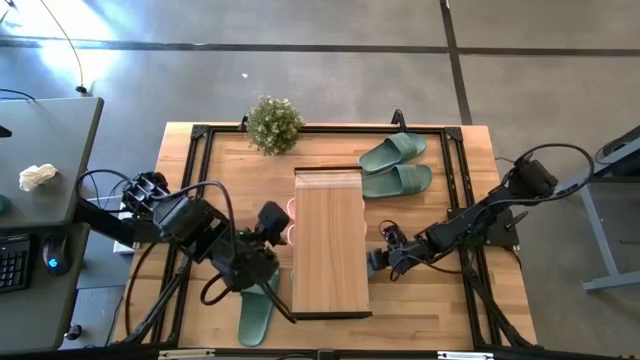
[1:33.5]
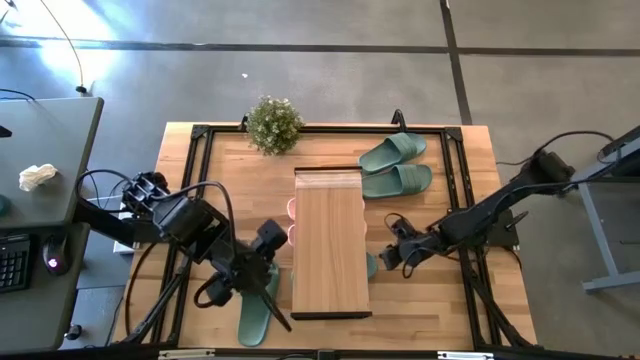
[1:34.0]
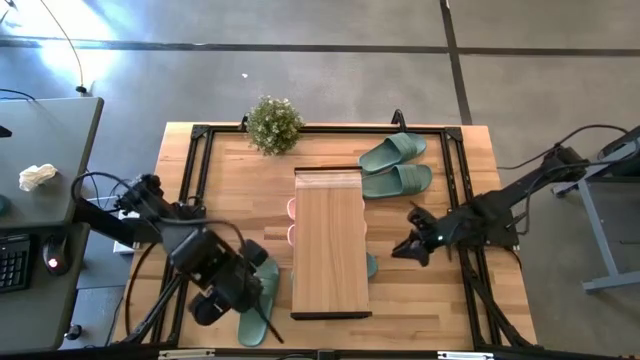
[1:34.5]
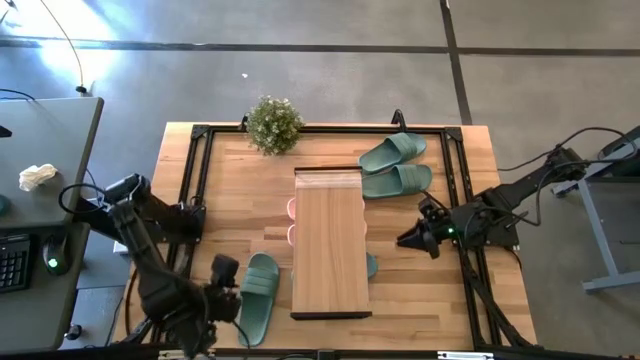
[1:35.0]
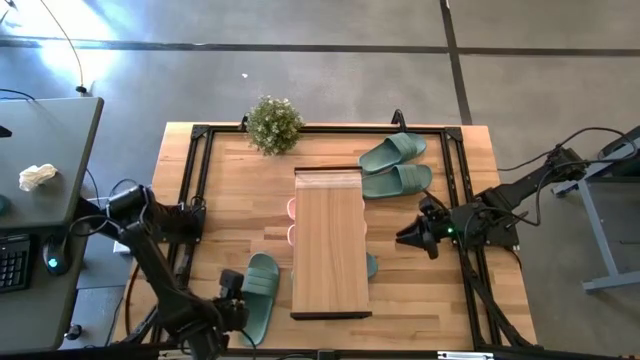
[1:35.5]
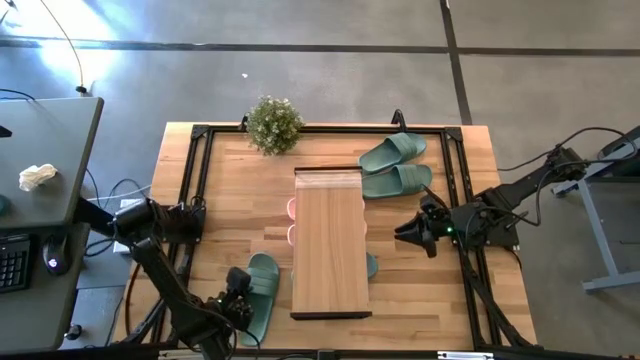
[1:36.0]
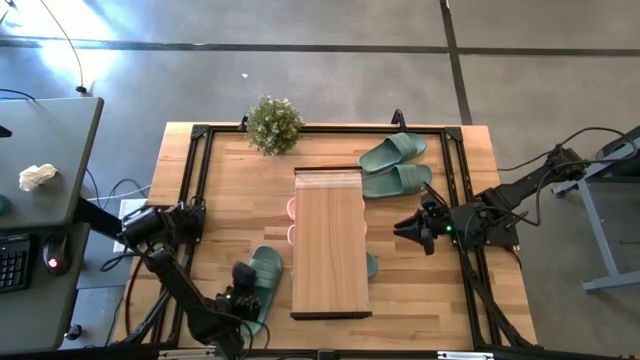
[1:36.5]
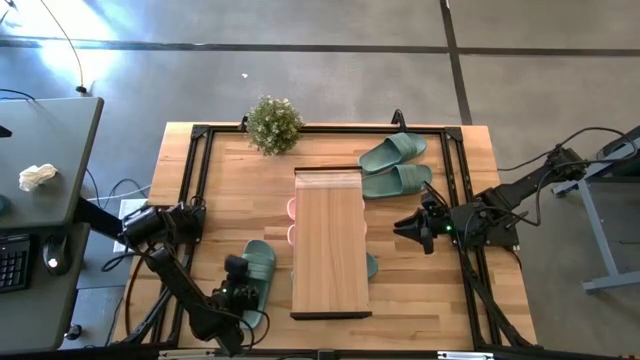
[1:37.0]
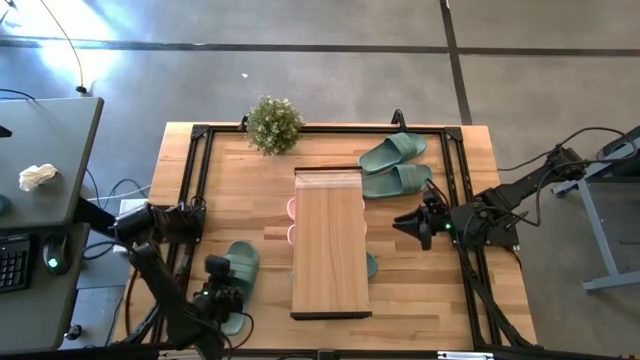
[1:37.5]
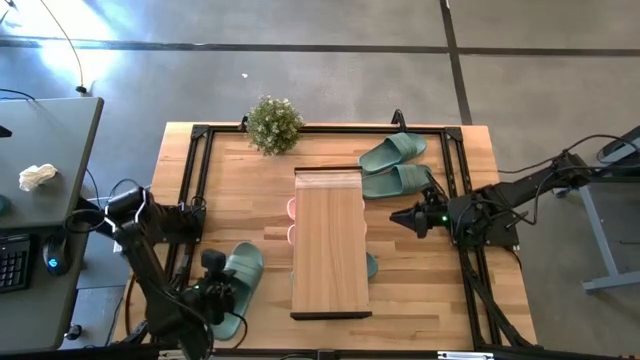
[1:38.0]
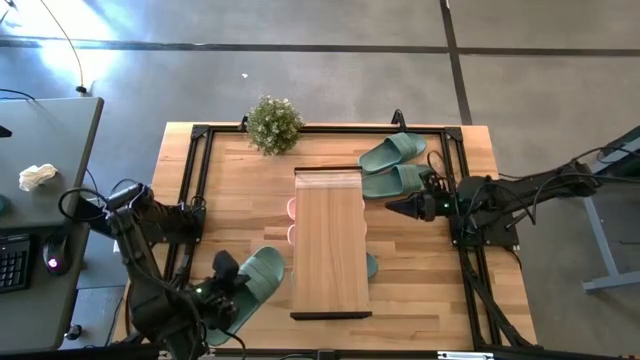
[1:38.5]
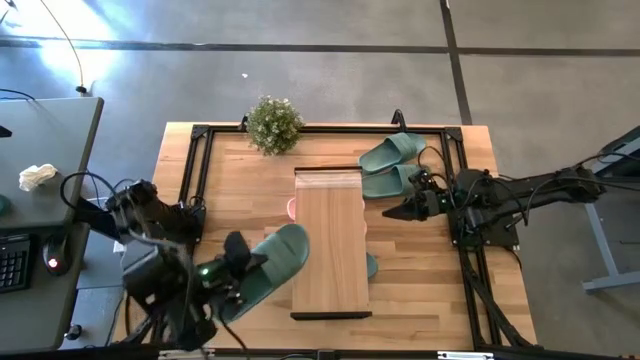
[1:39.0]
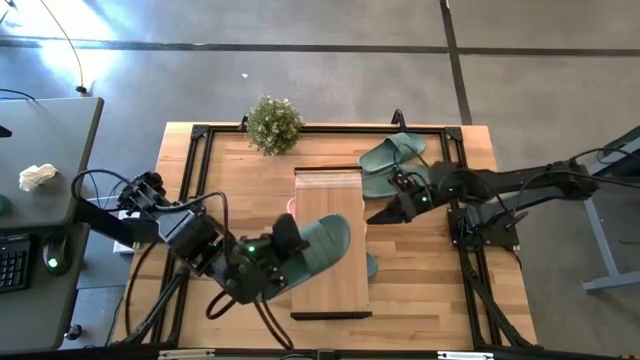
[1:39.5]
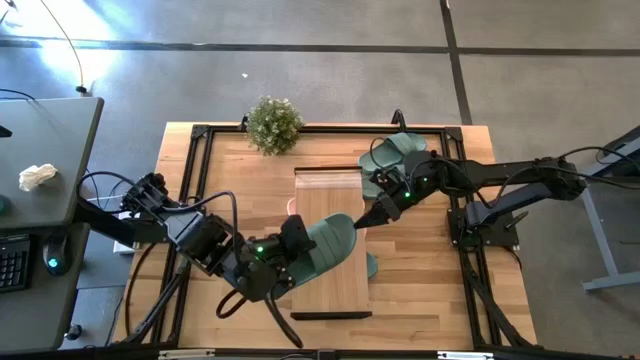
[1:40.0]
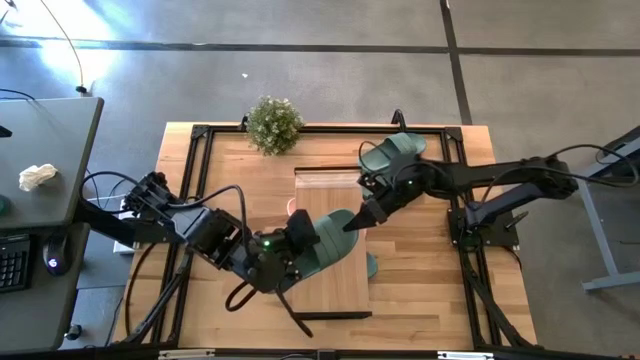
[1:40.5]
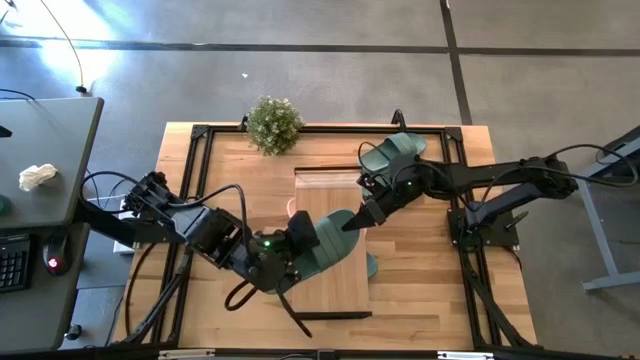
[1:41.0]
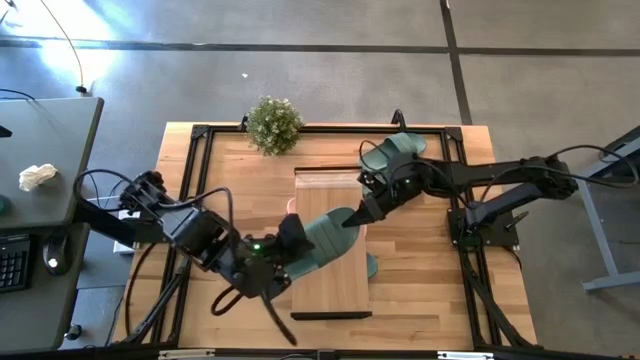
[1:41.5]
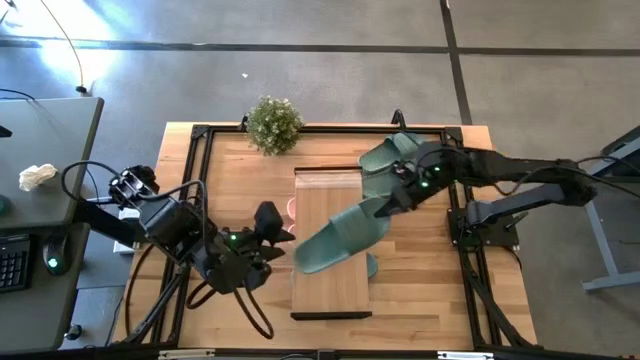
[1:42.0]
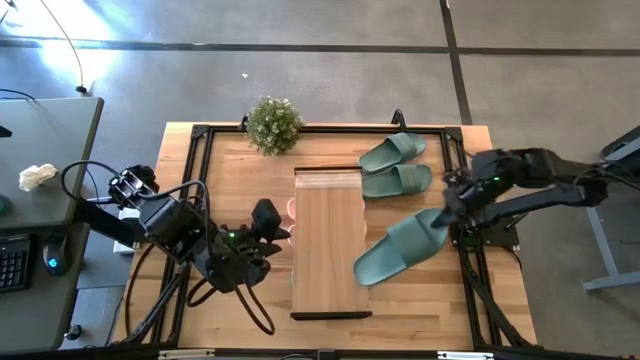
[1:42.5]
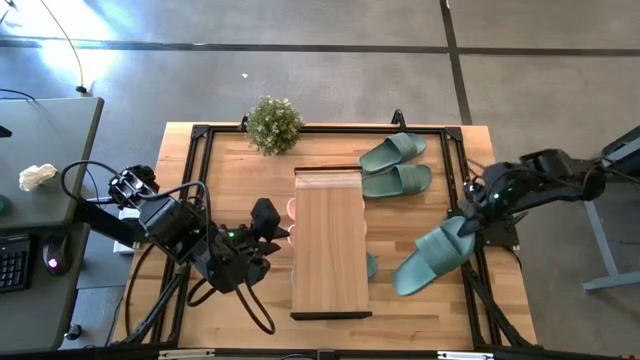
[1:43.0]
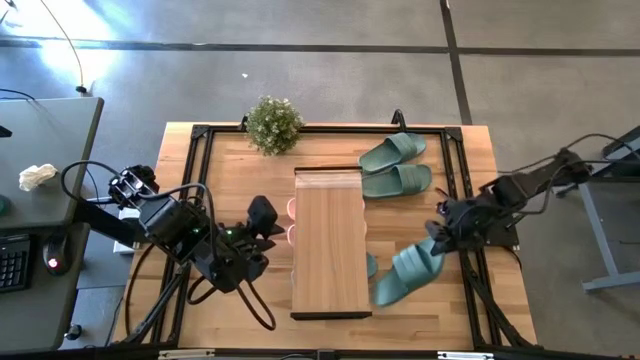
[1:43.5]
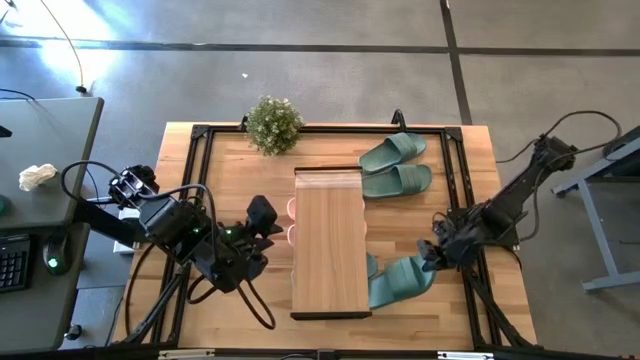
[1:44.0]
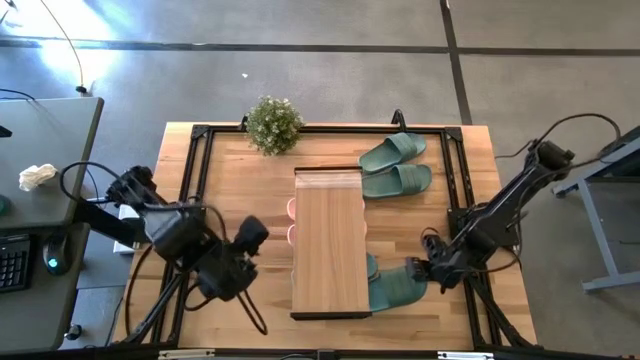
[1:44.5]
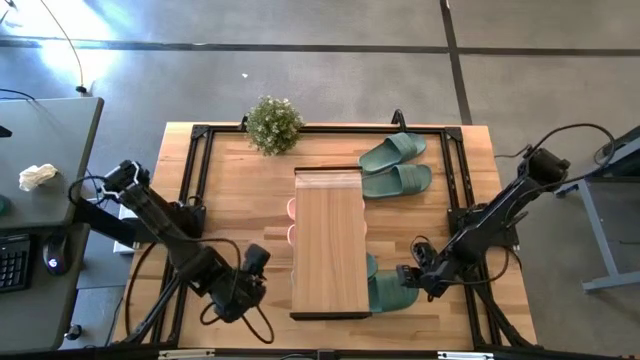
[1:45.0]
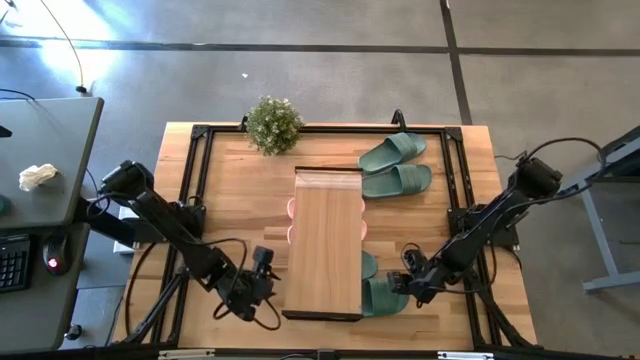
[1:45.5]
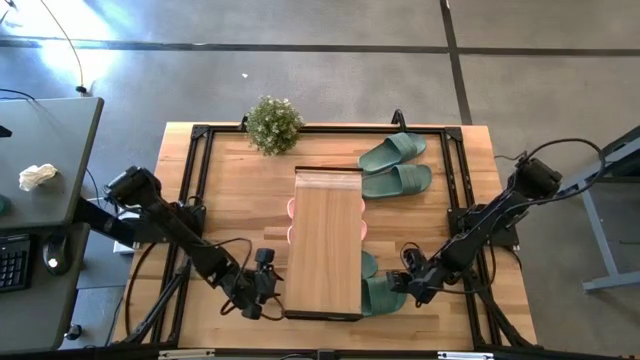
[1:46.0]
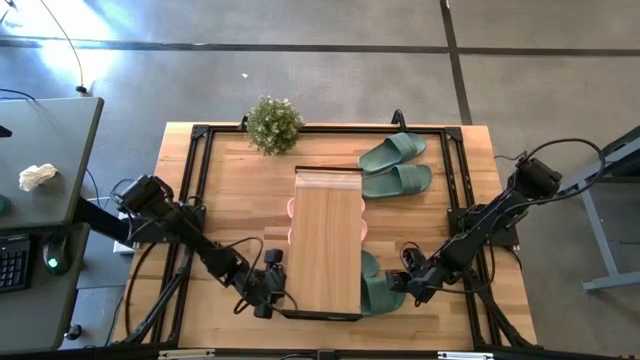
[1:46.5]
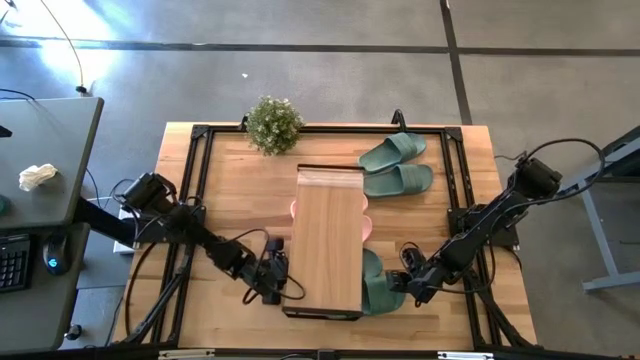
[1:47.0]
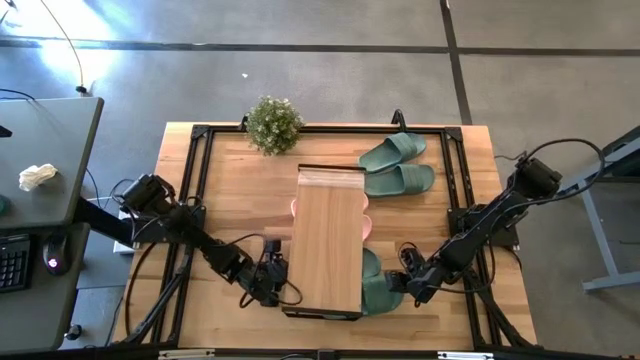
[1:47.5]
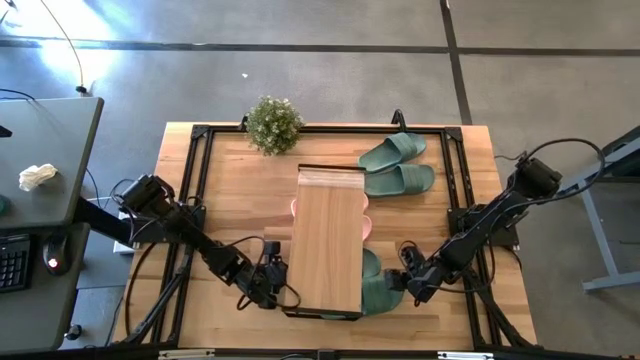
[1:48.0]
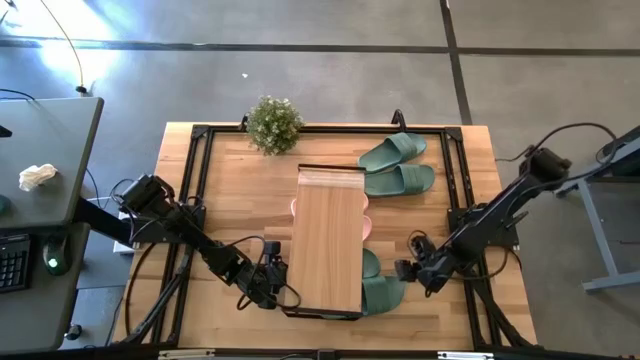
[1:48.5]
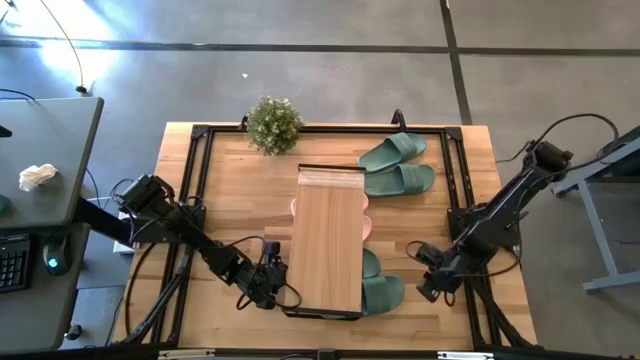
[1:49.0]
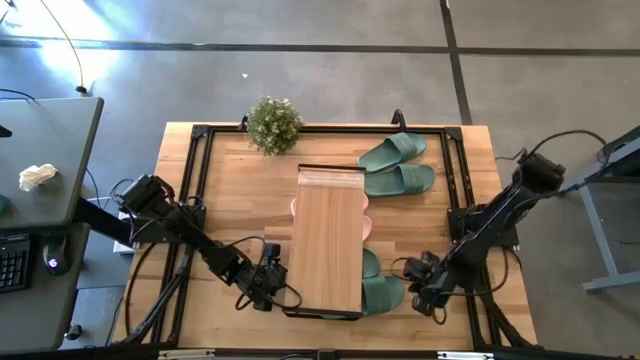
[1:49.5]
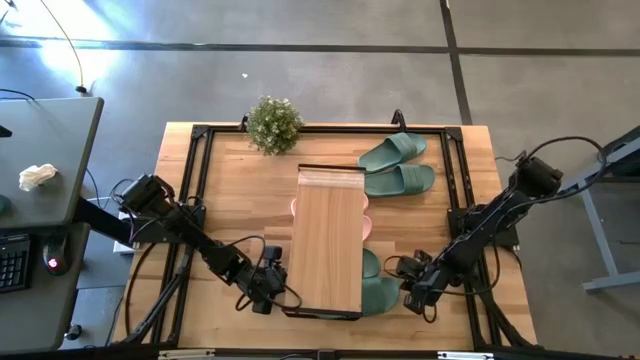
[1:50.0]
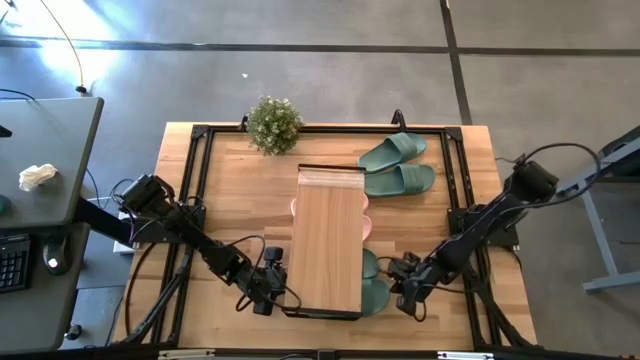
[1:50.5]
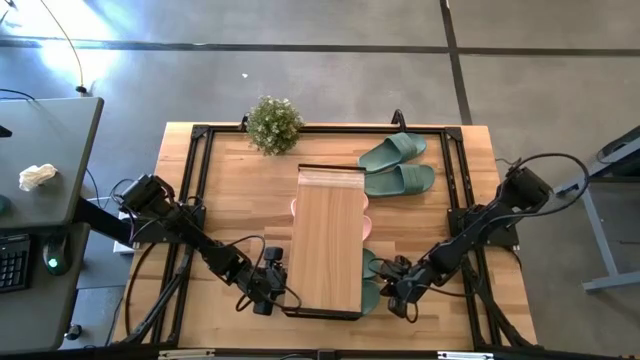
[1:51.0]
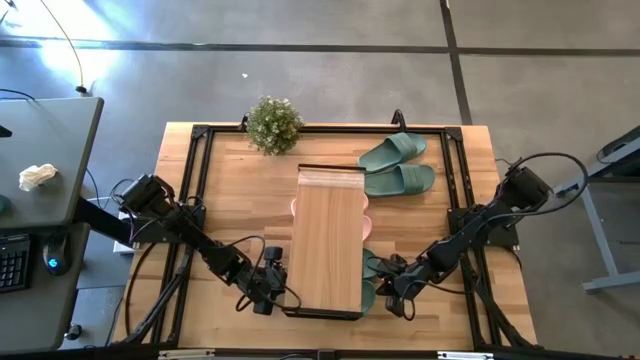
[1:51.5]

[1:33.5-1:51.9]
Task: Pick and place slides into the shelf
Put the bottom green slide under the shelf aligned with the other green slide

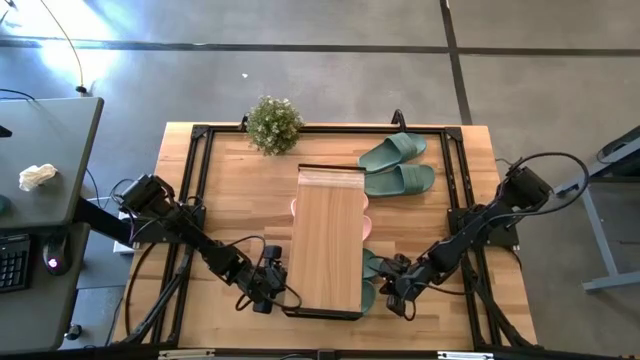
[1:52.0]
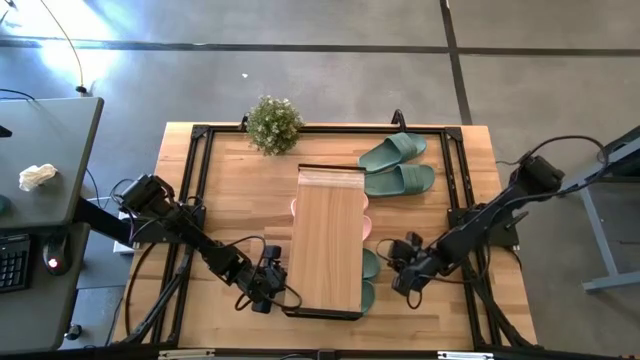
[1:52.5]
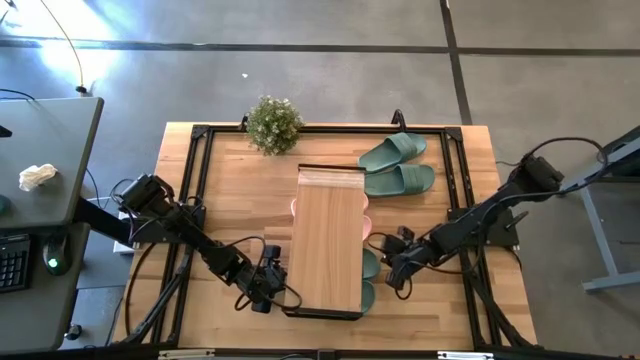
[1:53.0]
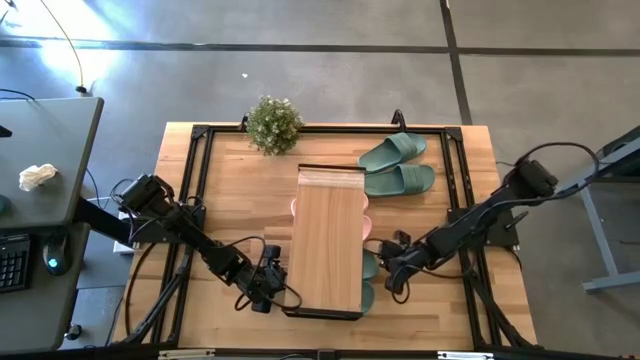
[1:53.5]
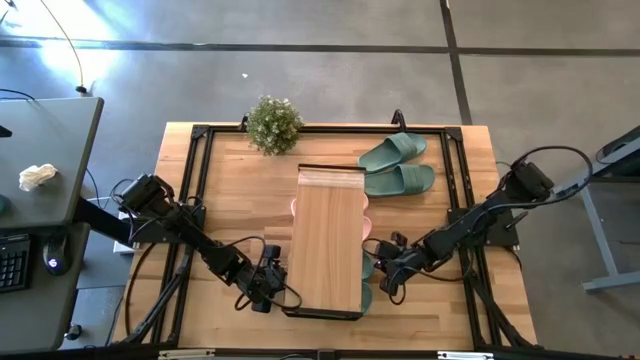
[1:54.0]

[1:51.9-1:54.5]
Adjust the green slide under the shelf

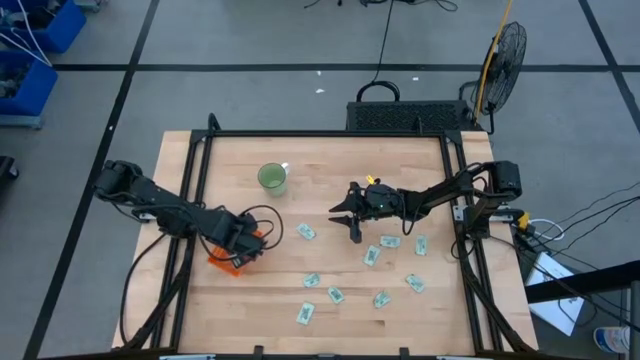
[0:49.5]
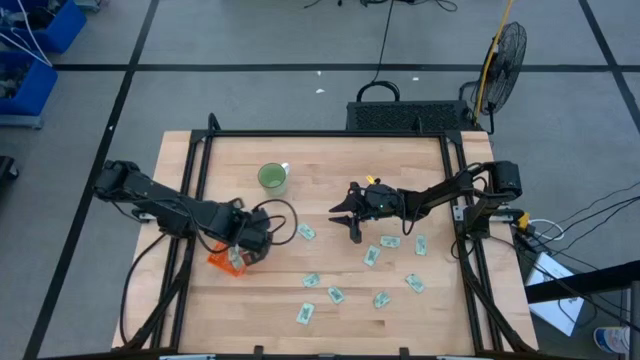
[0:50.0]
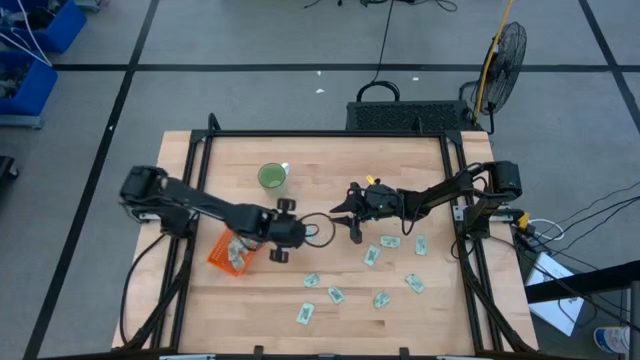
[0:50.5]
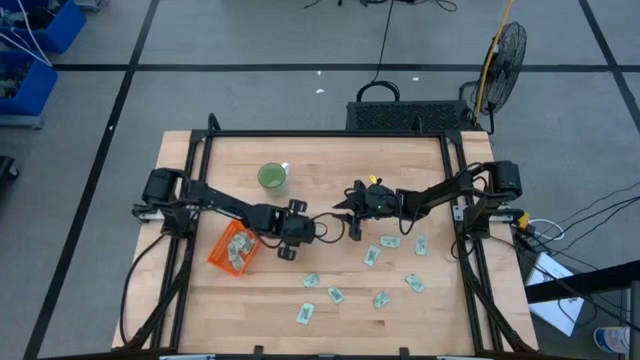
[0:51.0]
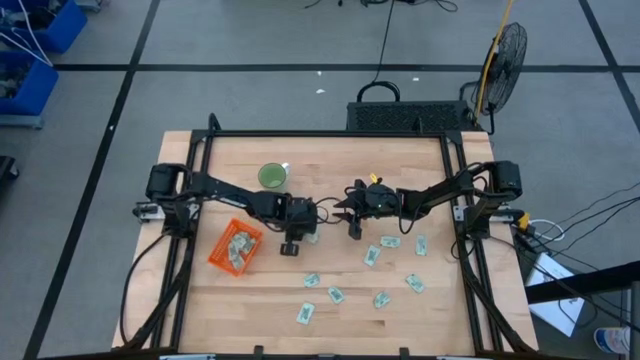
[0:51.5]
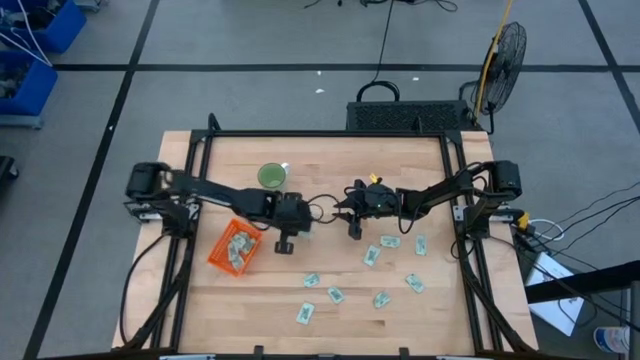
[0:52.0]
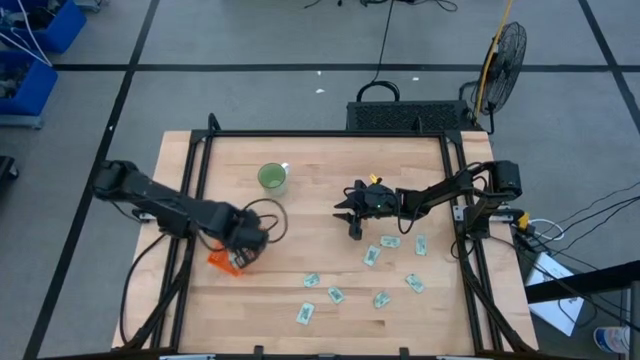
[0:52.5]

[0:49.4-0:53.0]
Task: Pick and place Stevia / Truvia into bins
Put the stevia packet into the orange bin
